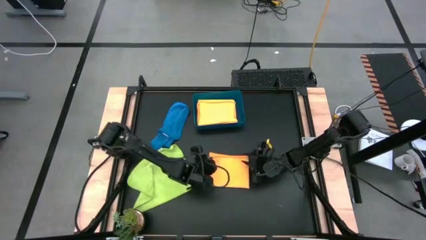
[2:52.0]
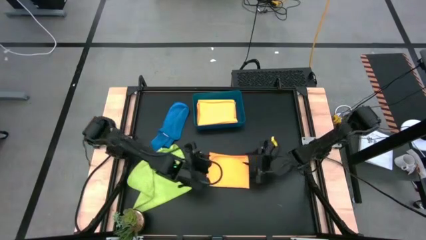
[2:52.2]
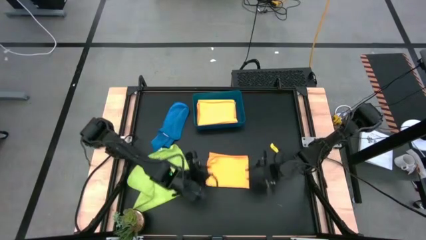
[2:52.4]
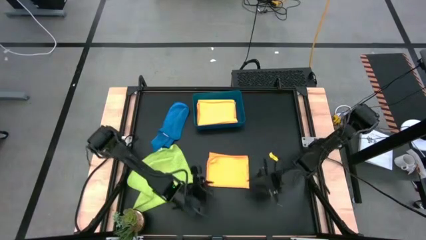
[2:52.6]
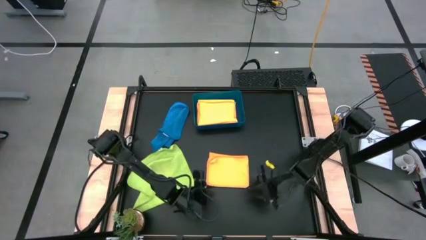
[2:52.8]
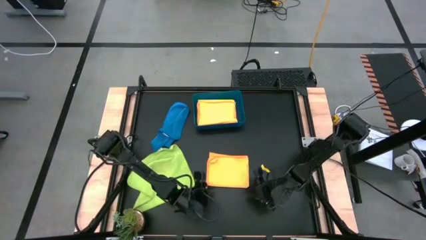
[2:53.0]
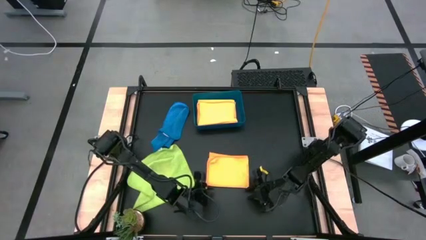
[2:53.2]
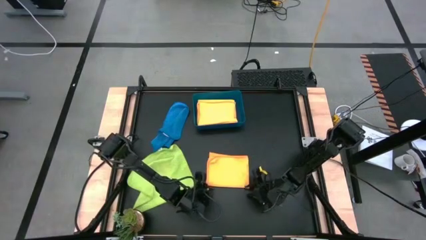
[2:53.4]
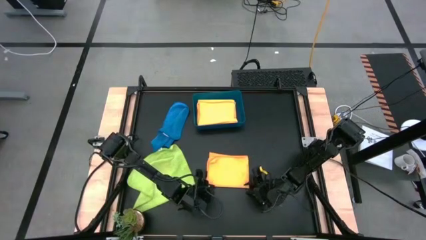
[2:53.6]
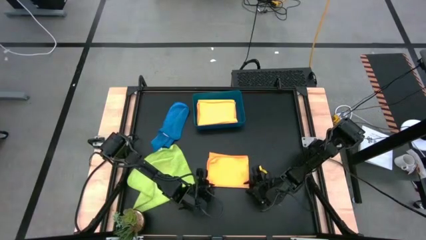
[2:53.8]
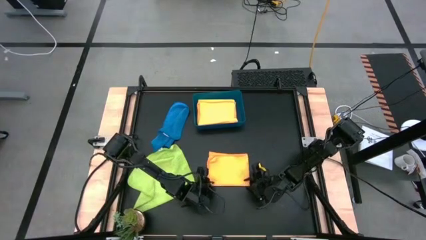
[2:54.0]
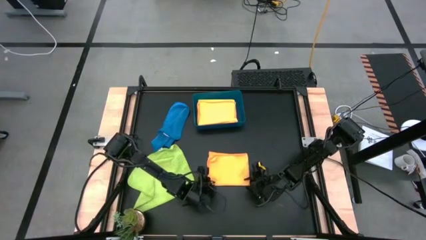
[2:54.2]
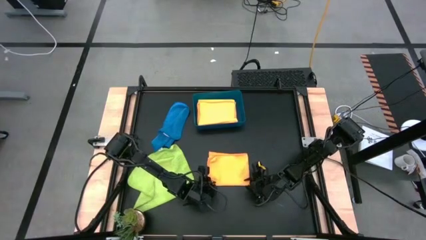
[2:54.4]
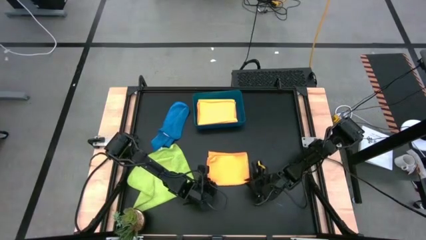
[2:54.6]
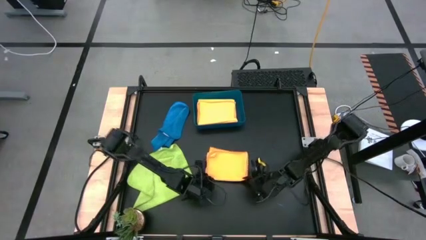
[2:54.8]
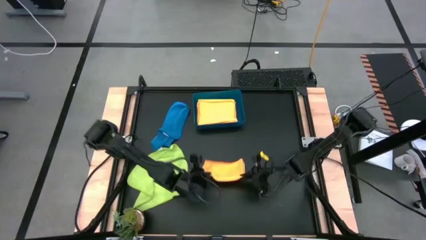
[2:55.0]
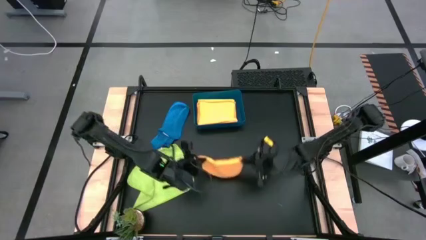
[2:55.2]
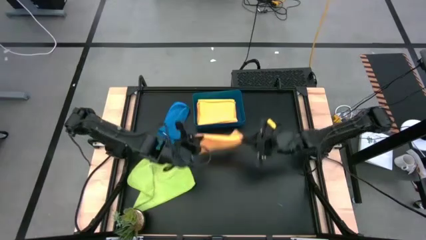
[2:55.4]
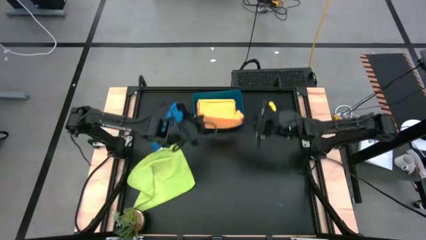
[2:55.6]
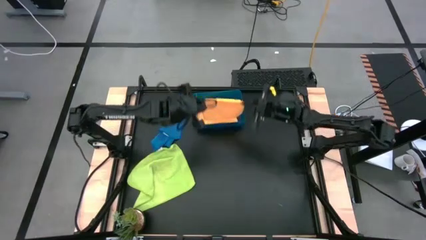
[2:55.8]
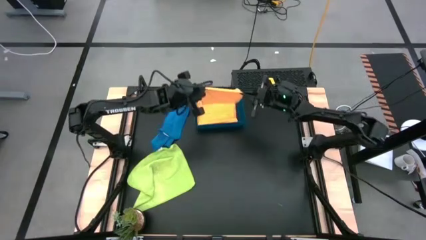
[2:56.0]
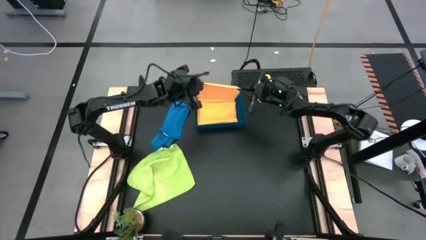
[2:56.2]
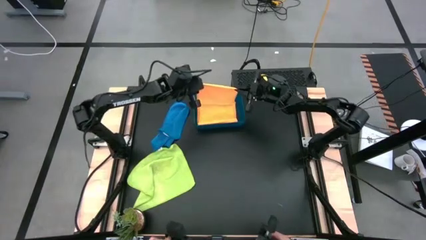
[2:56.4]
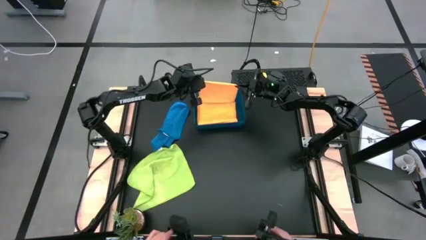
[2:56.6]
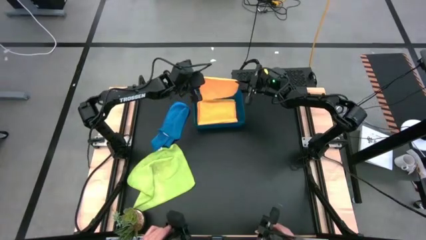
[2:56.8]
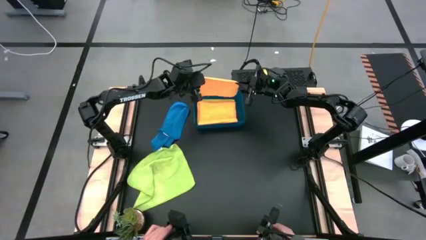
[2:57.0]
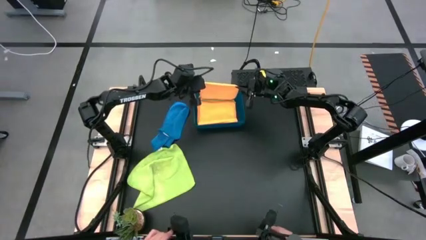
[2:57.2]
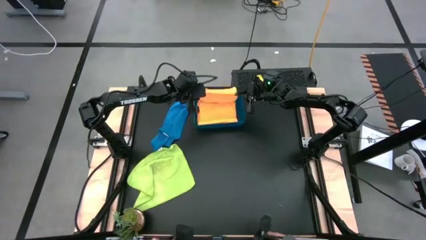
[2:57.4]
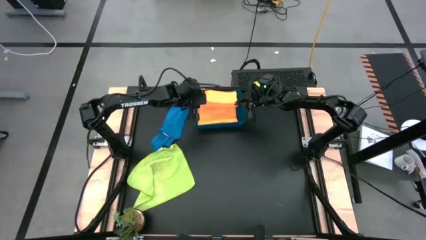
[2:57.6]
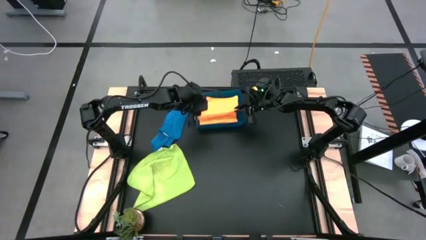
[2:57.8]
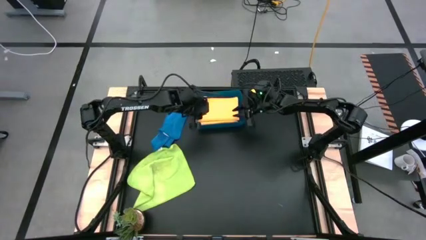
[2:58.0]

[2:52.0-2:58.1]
Task: Fold microfiber towels
Put the folded orange microfiber cloth into the blue bin
